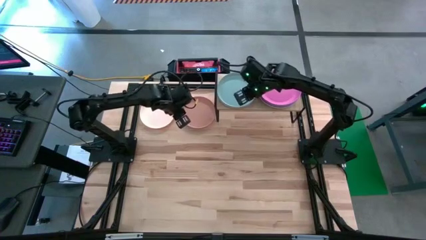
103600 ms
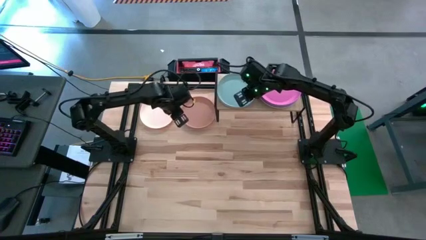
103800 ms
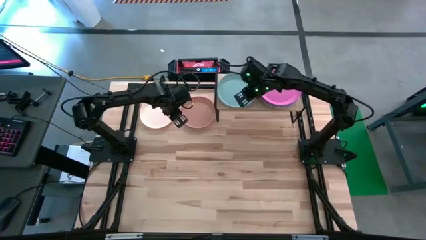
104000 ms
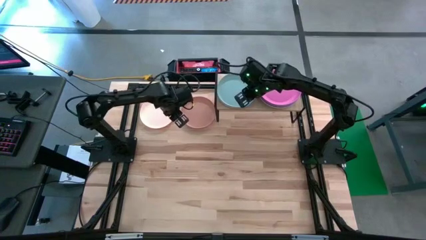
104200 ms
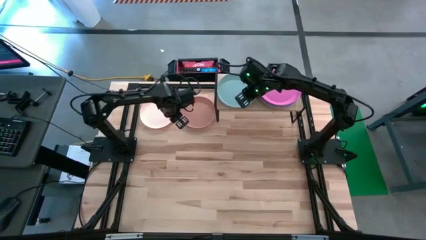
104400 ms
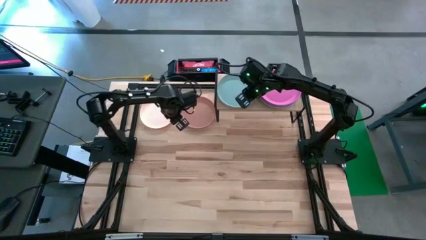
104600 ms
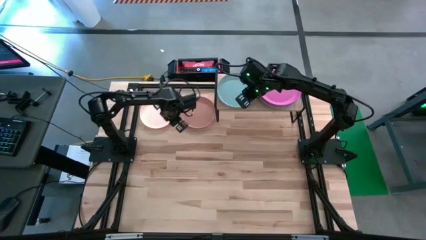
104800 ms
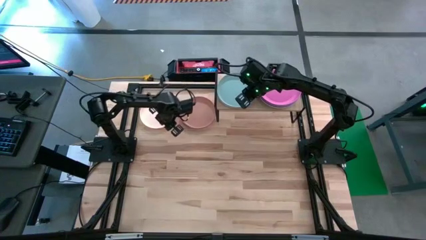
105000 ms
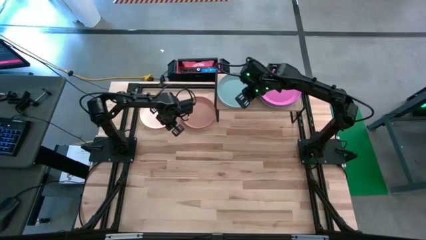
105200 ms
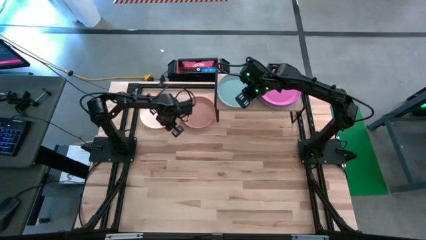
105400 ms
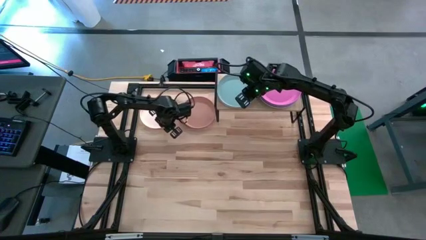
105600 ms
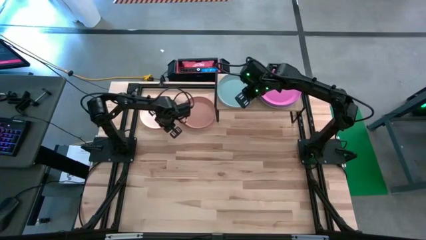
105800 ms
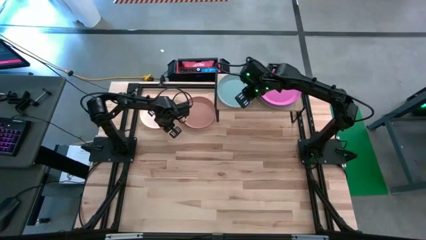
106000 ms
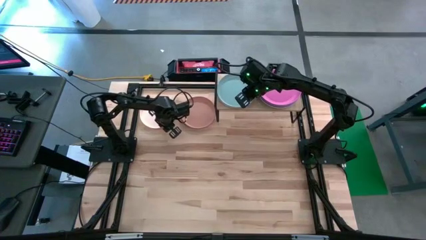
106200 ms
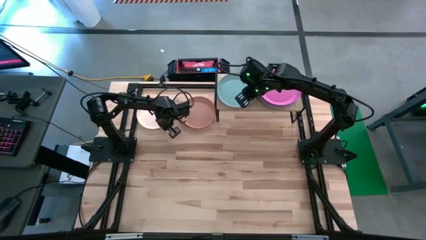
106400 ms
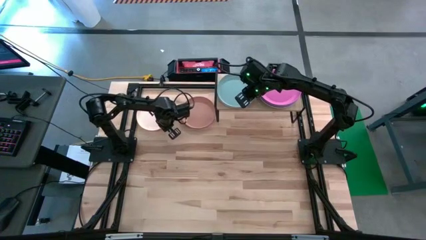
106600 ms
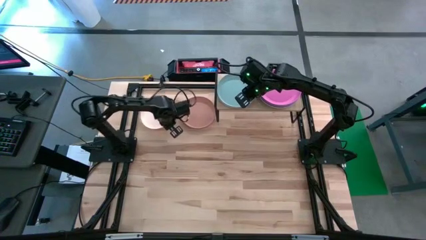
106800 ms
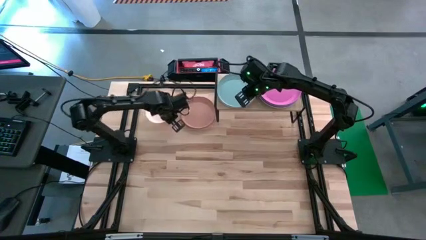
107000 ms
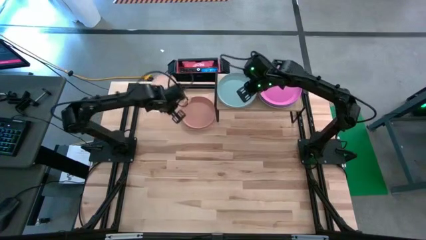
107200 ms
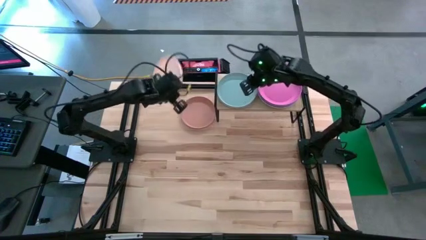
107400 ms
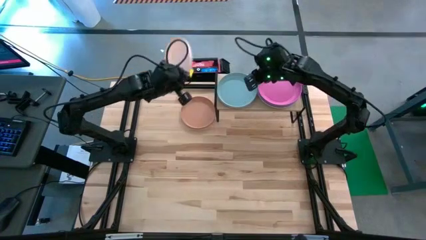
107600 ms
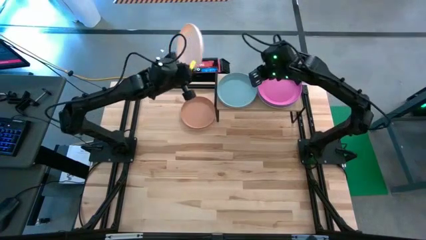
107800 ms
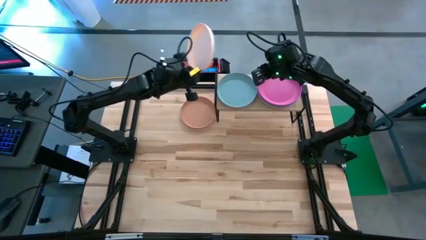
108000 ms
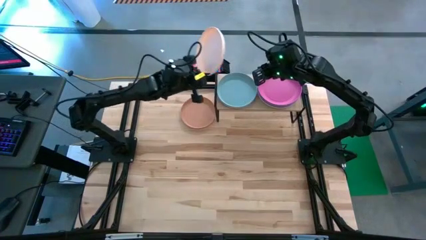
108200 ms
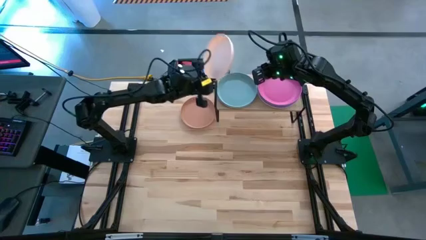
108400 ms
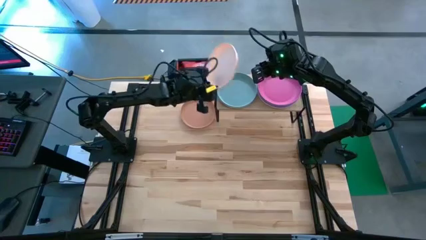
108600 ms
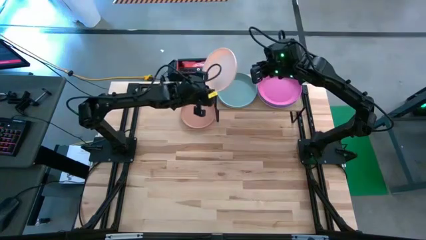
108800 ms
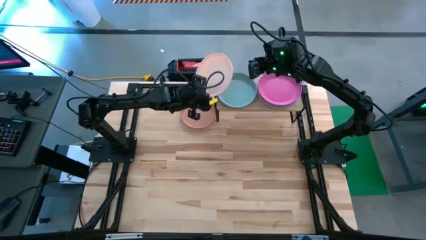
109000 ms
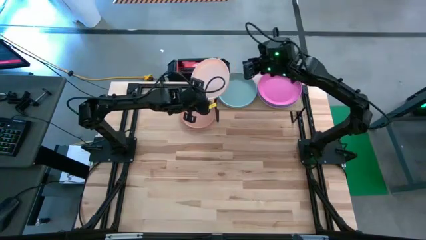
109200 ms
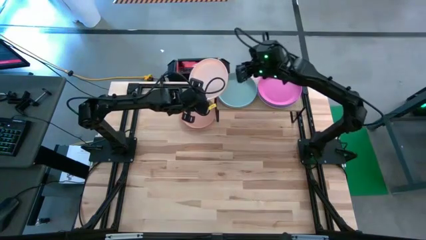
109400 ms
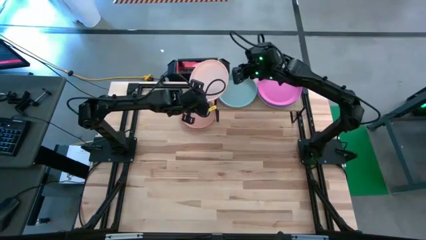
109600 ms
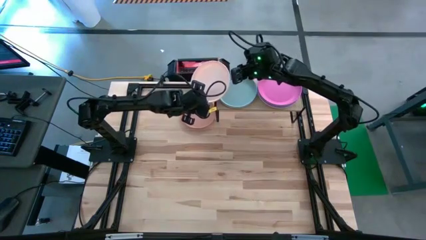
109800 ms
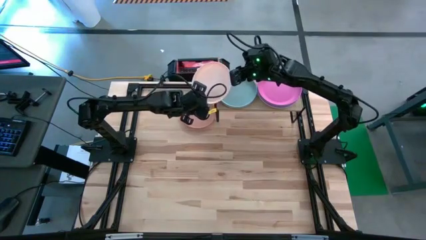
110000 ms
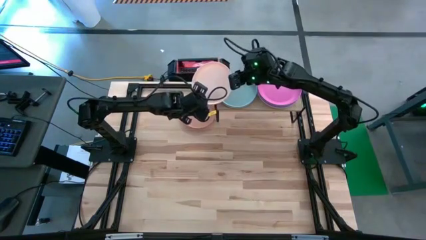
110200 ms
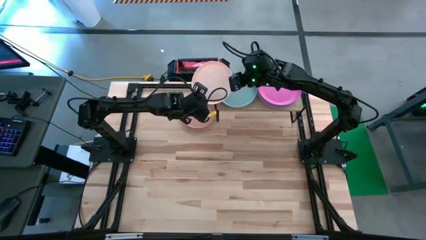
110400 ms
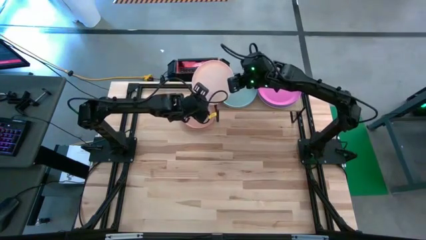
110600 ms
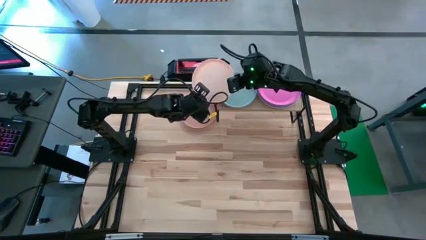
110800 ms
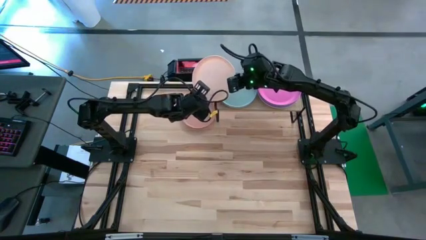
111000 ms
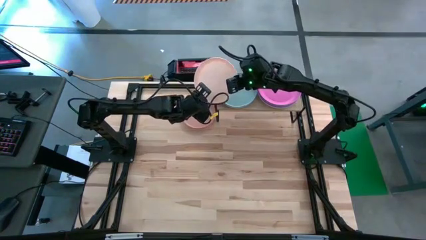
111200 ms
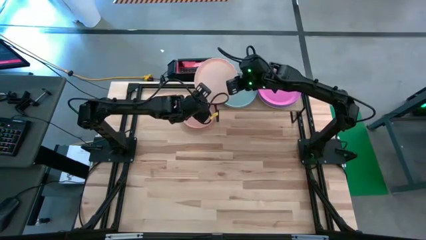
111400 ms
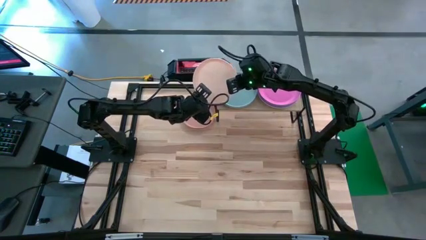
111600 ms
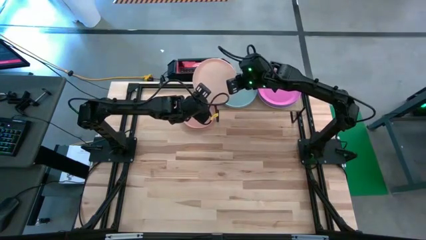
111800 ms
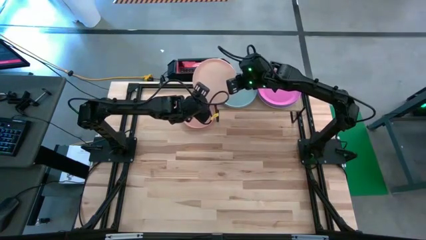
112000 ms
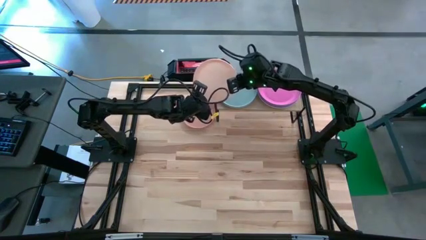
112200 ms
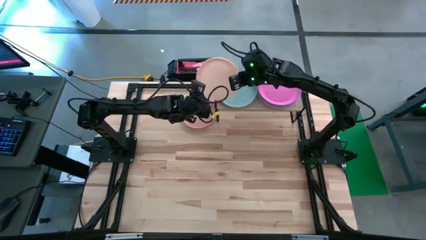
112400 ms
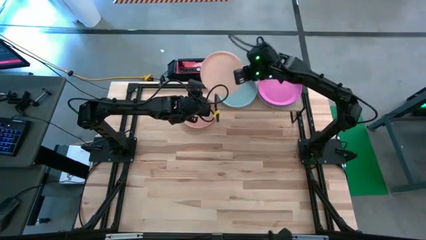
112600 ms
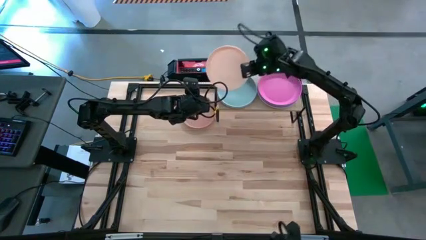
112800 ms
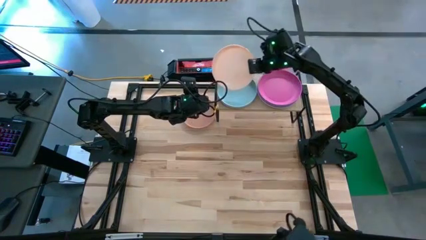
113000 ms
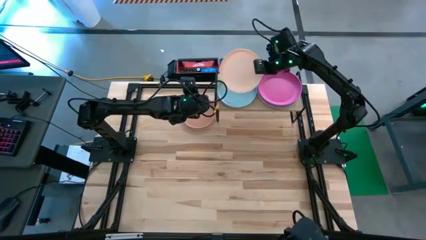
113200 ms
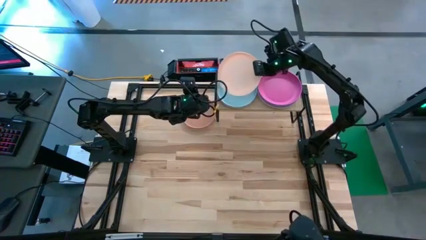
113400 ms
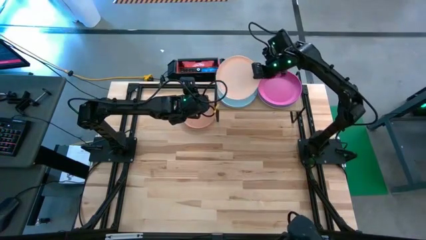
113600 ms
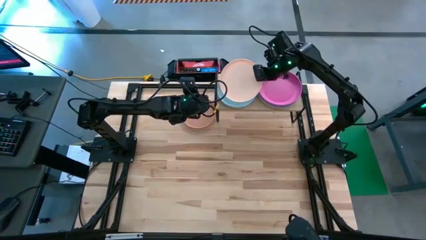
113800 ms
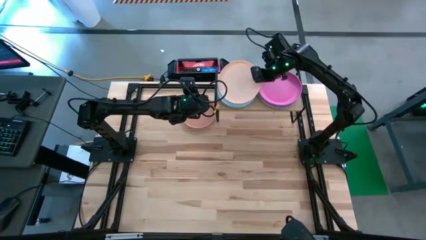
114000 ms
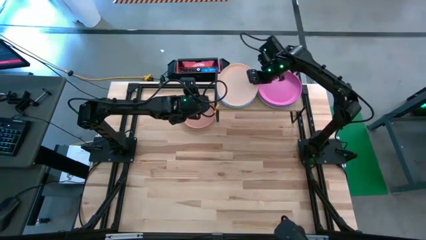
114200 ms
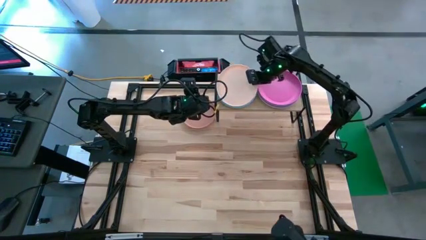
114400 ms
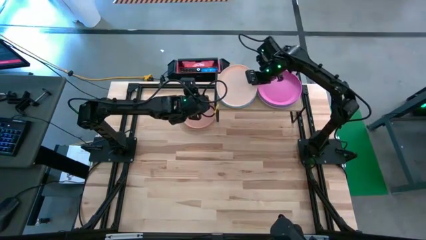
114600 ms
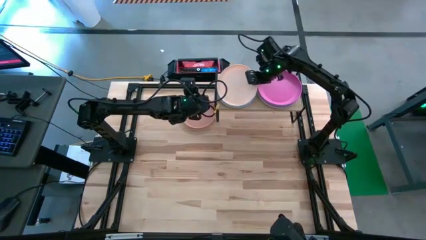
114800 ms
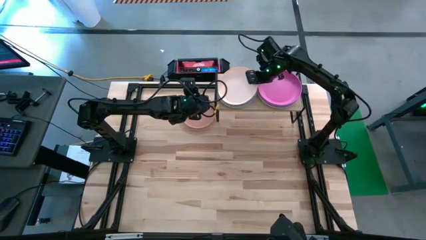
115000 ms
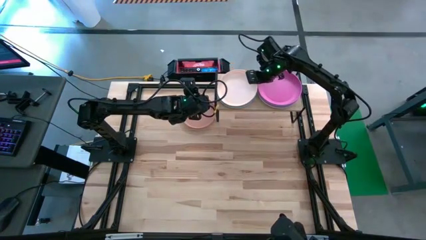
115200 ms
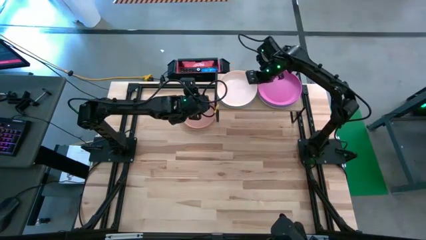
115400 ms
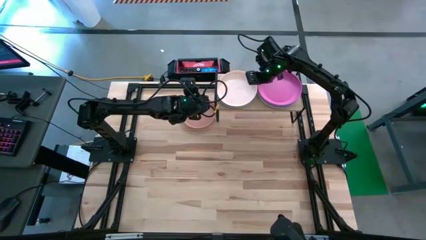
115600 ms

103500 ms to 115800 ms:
Task: Place and stack plates onto a shelf
Stack the white plate on top of the green plate on the shelf

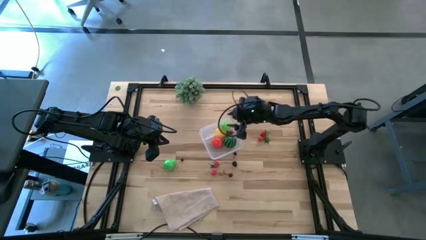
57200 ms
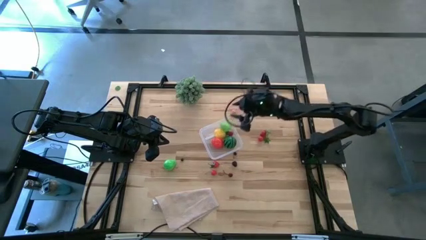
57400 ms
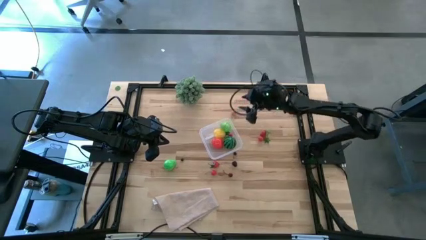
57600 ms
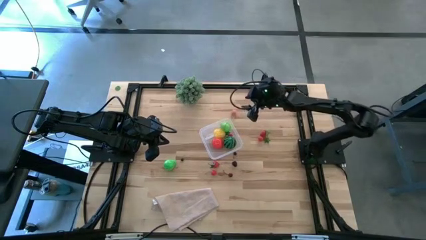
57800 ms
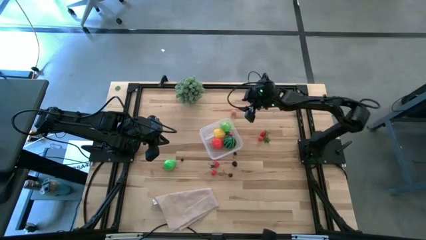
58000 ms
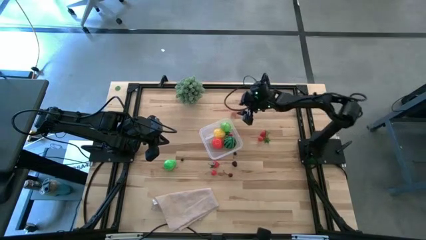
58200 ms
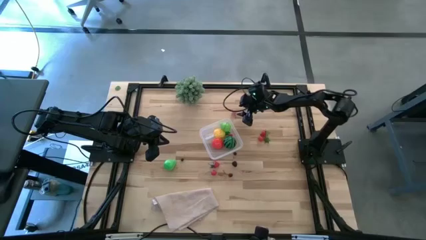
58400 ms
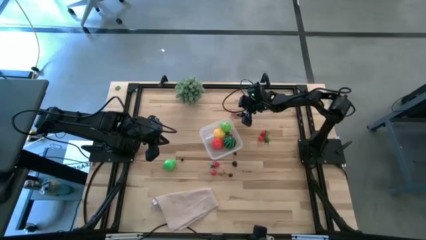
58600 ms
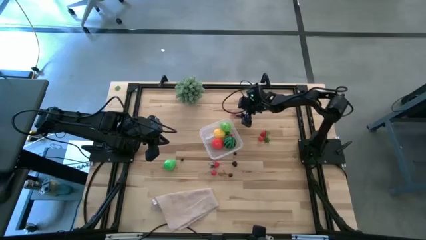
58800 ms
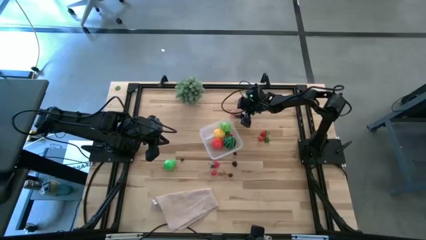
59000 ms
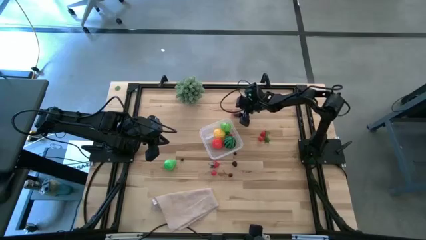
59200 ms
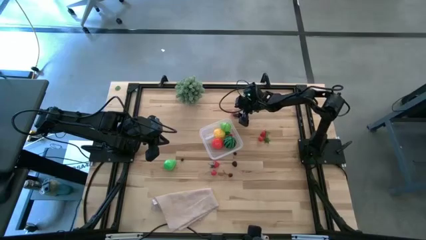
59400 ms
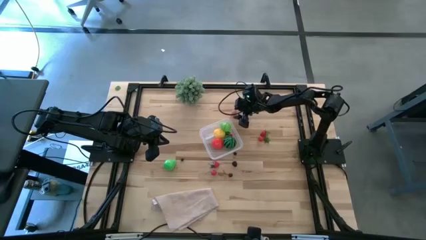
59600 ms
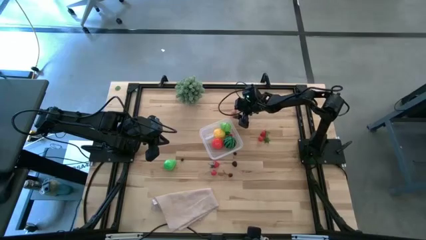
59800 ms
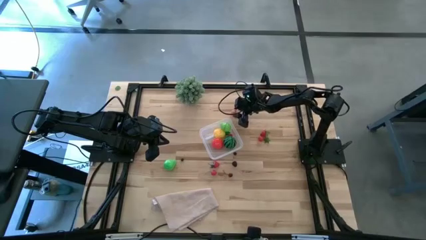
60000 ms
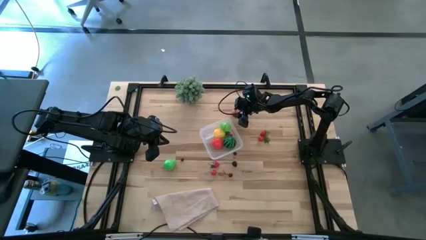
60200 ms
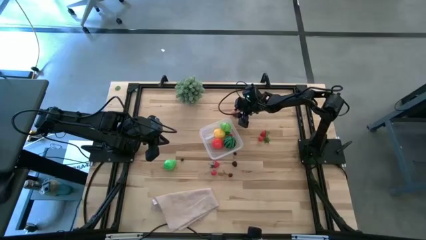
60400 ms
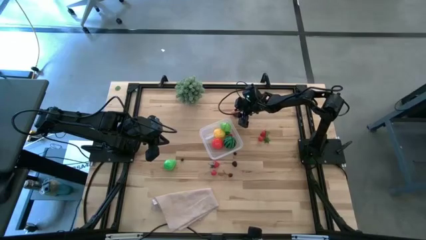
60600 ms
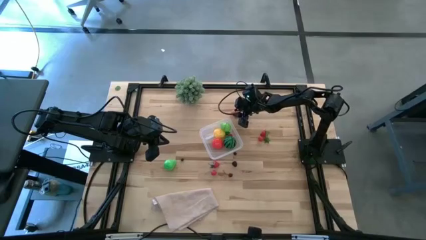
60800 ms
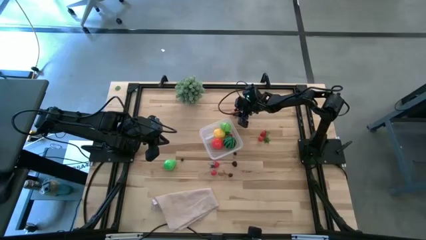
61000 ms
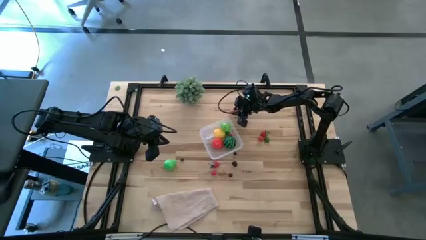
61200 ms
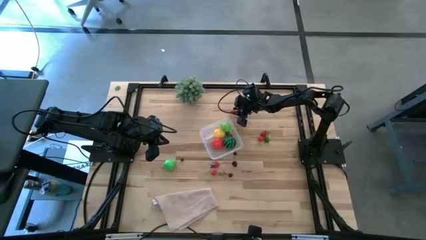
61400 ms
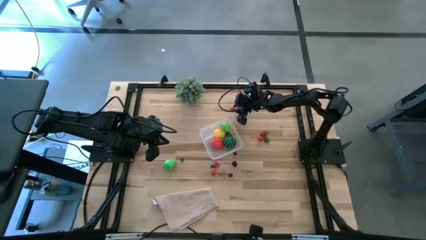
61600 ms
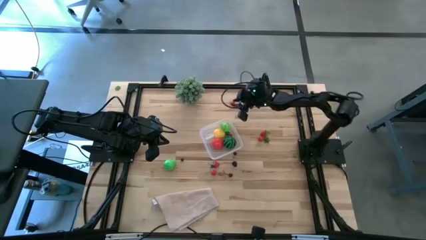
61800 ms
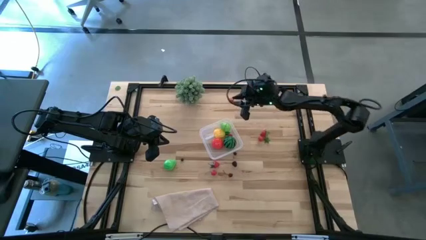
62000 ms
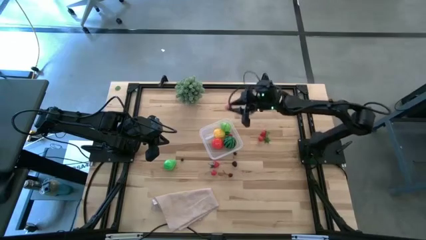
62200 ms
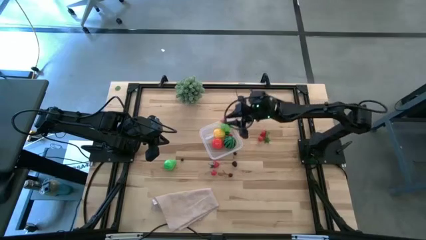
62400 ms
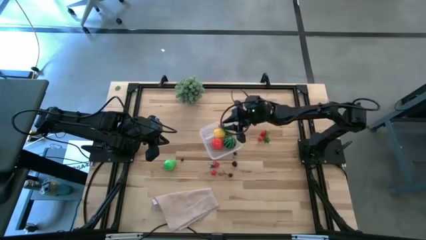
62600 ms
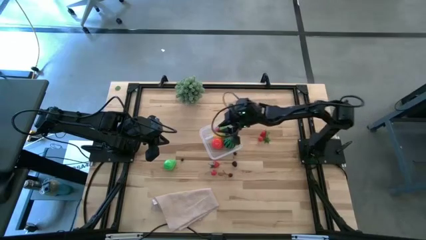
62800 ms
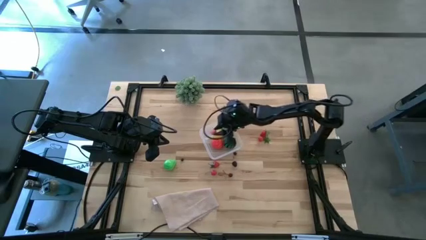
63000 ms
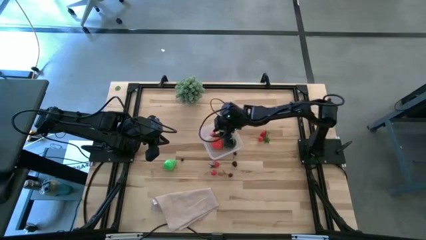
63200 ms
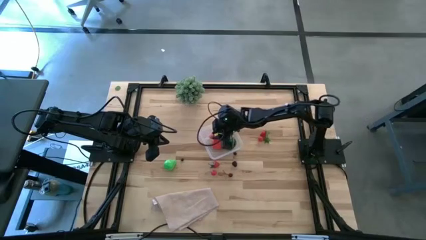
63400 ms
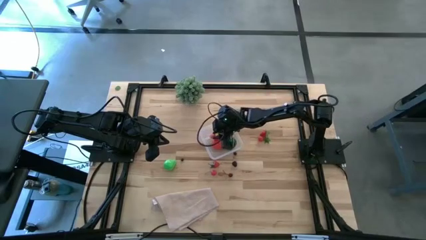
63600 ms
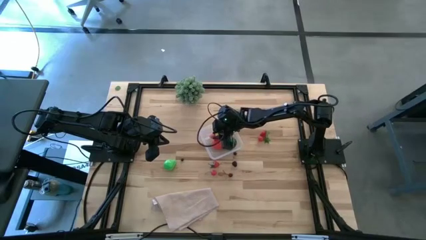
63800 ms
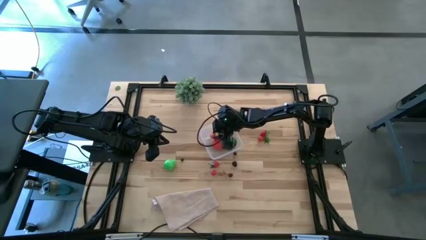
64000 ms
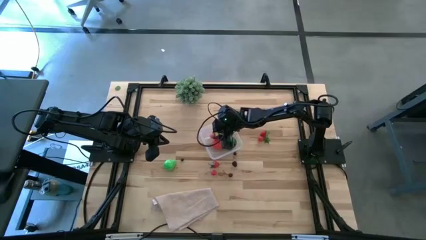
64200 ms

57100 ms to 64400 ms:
Task: Pick and placing Produce into tupperware
Put the pink peach into the transparent bin
